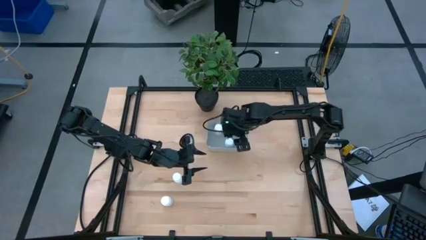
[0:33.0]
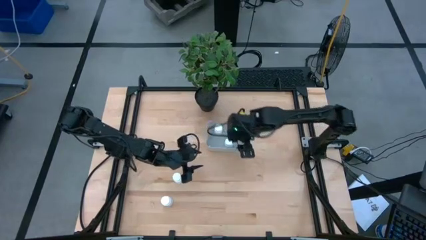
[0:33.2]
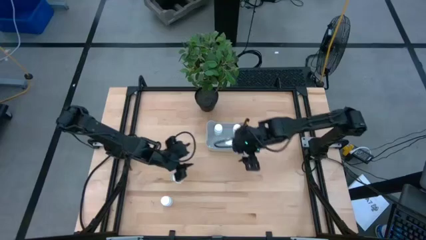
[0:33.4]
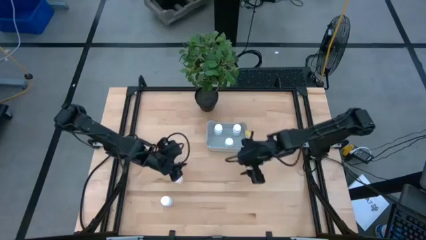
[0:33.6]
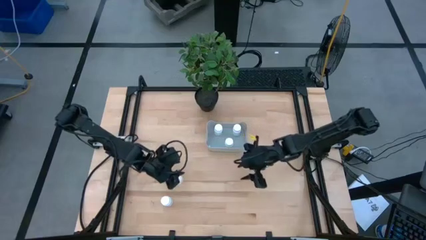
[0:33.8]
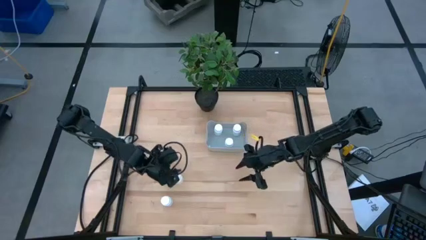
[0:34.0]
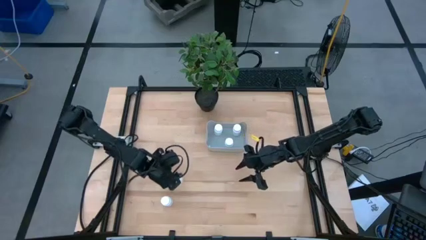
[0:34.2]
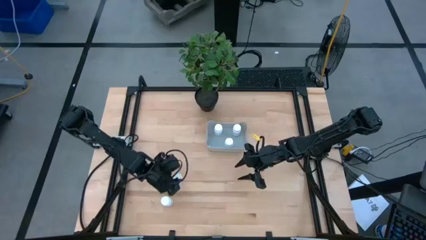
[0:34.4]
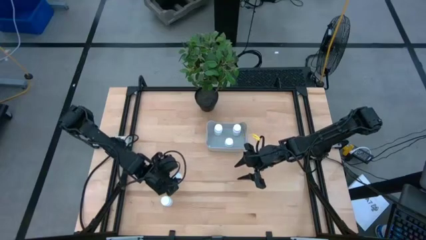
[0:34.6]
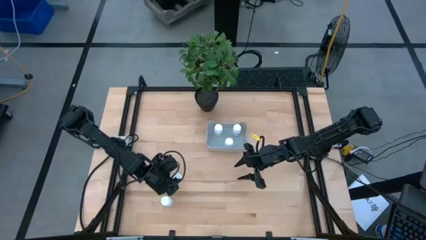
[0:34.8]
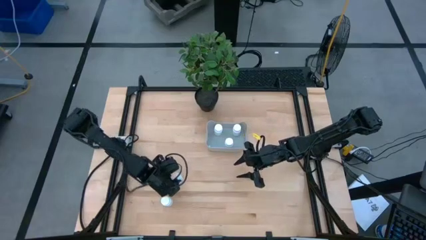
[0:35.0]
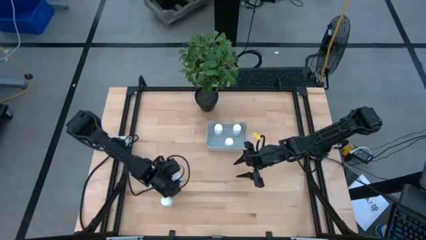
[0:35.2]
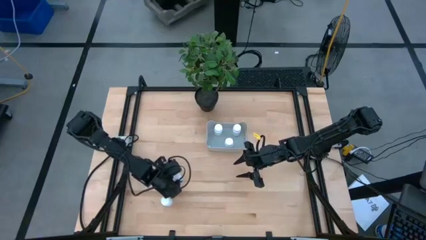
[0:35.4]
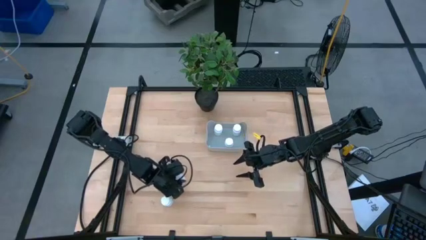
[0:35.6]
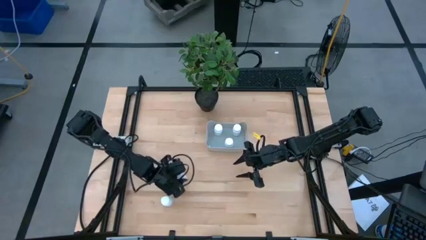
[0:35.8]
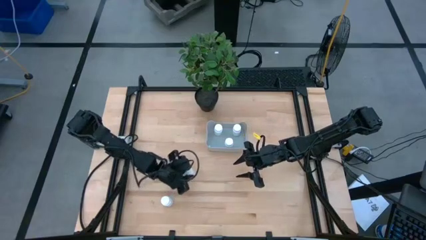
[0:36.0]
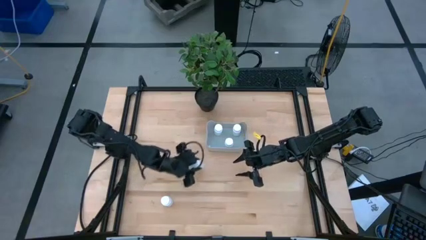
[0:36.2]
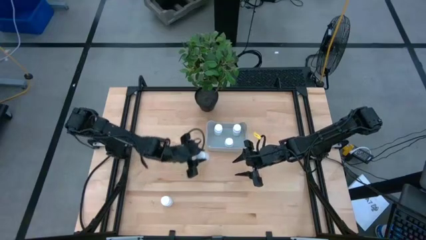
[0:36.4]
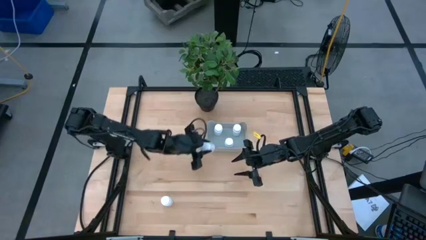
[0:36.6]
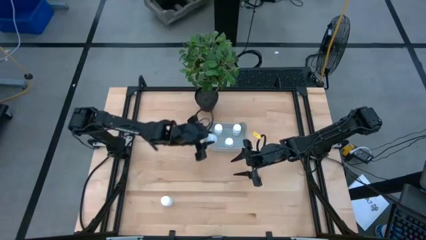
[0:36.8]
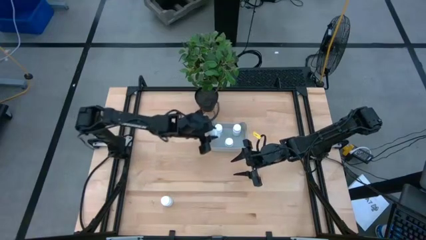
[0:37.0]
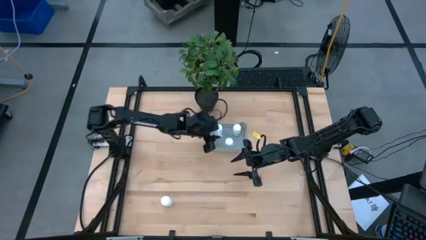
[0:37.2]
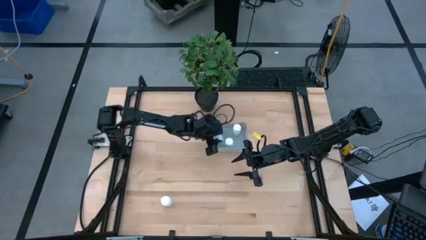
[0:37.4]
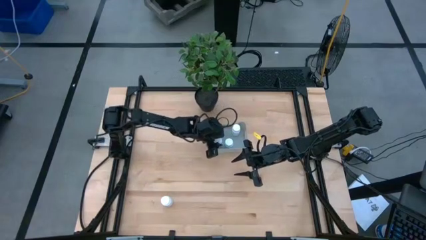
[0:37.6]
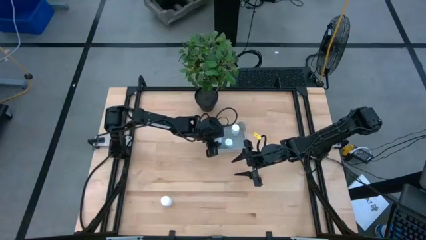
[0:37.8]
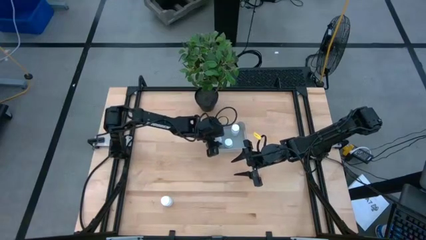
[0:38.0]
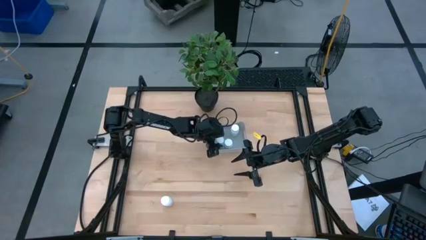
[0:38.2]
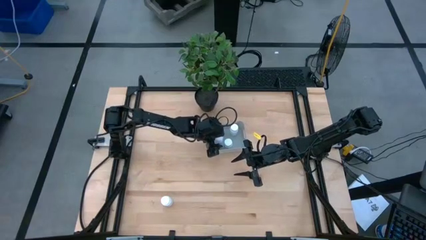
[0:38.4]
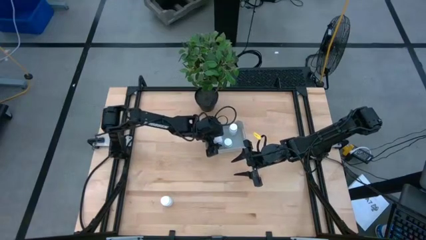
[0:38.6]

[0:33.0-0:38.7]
Task: Pick and place pill bottles into a basket
Put the white medicine bottle into the gray bin

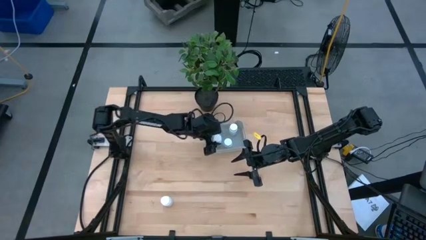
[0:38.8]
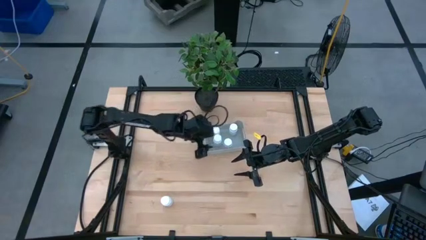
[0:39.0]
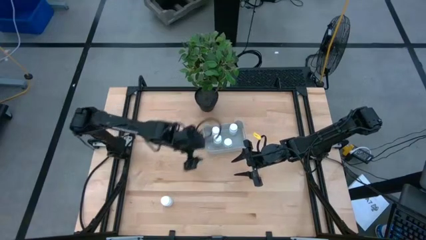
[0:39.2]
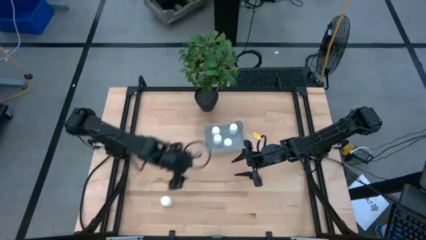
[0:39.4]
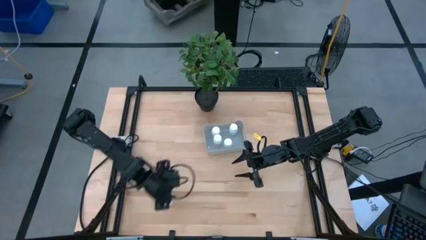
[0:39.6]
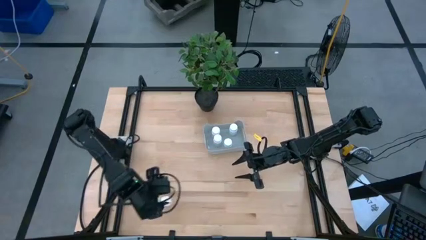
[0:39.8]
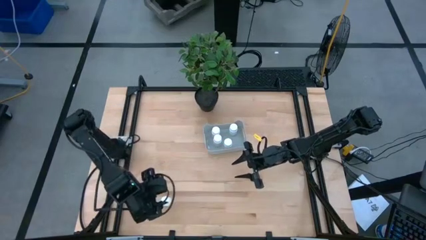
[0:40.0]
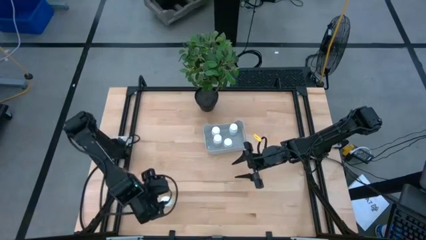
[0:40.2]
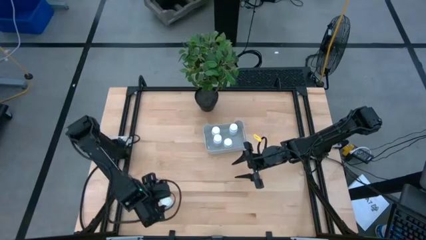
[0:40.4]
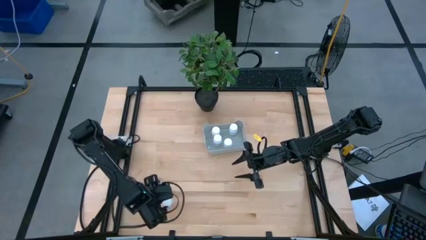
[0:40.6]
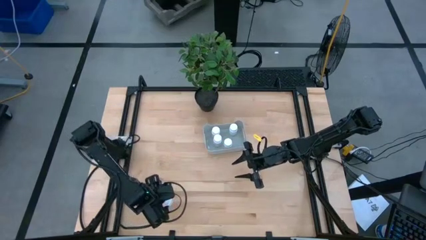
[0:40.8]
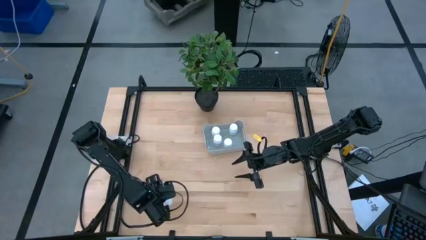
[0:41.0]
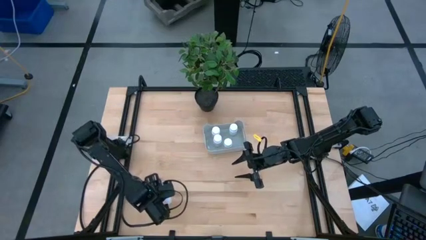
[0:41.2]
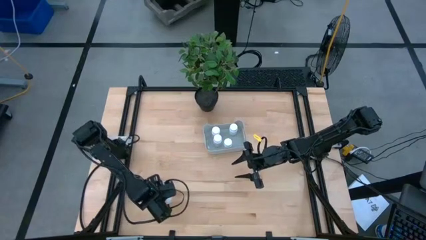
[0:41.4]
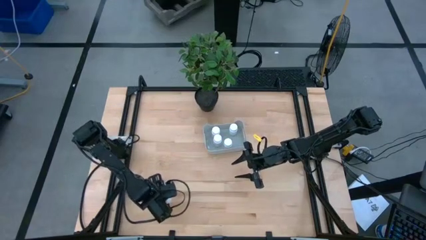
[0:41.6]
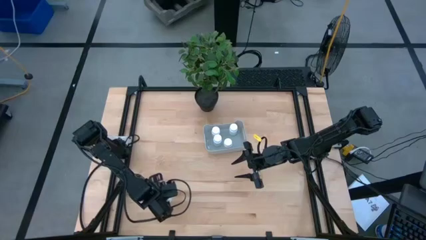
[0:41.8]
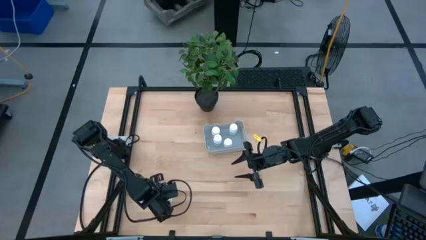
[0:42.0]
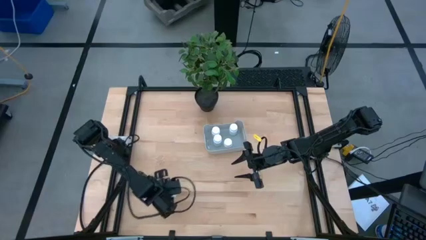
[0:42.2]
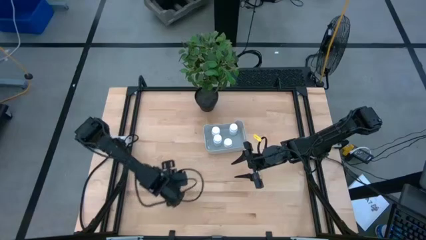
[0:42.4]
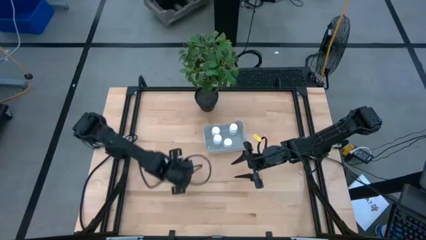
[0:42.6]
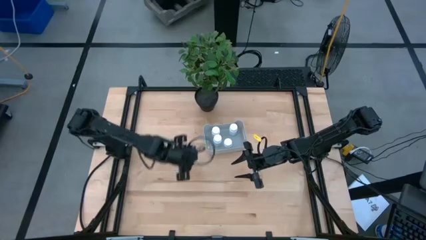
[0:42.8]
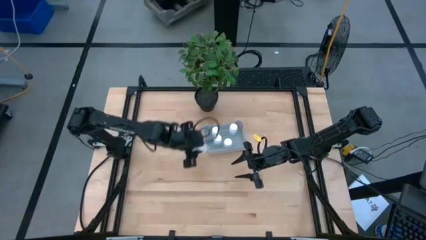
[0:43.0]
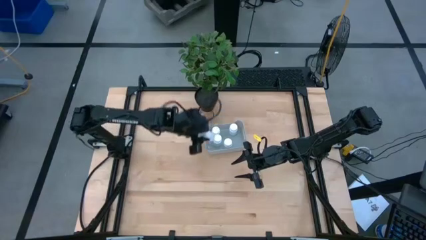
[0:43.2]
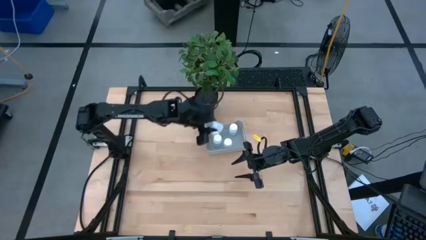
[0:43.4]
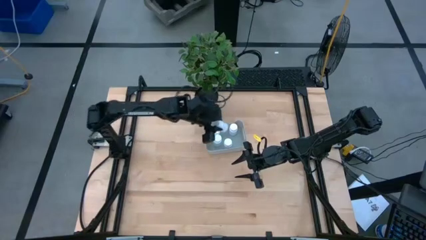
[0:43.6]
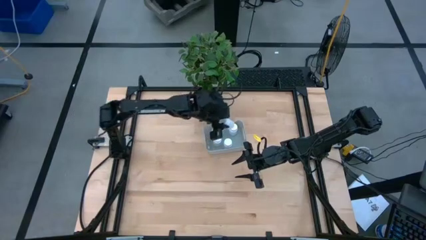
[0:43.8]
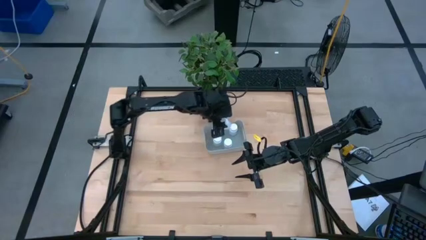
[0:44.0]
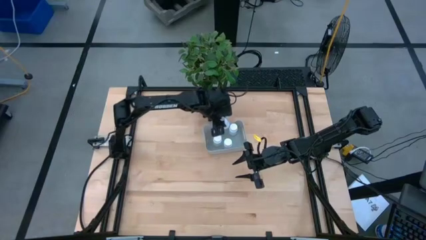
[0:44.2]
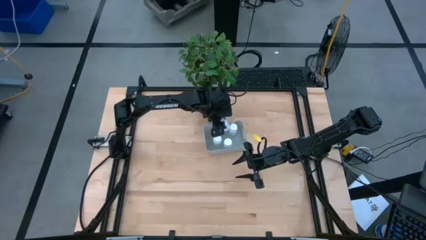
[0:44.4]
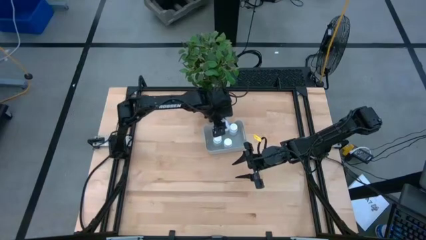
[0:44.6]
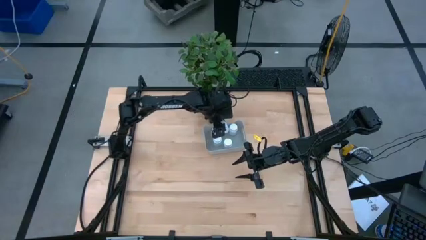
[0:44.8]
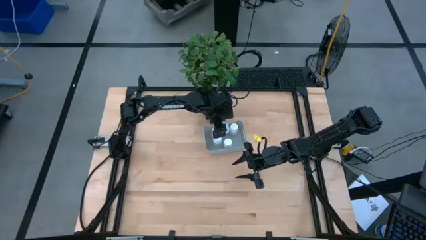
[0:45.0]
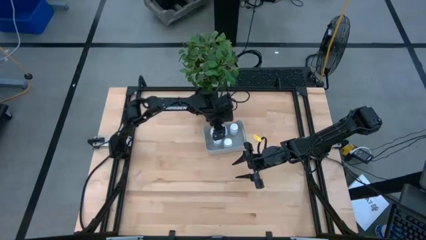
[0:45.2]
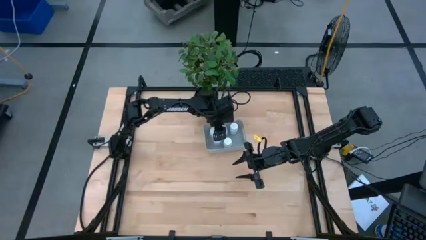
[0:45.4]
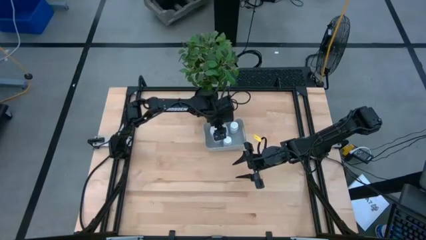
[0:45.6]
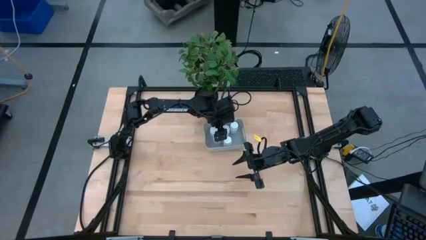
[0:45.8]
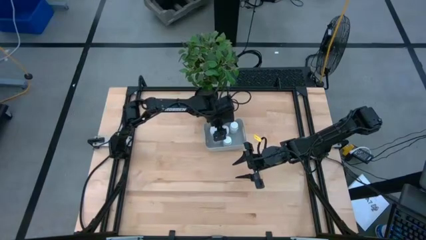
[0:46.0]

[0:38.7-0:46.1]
Put the white medicine bottle into the gray bin

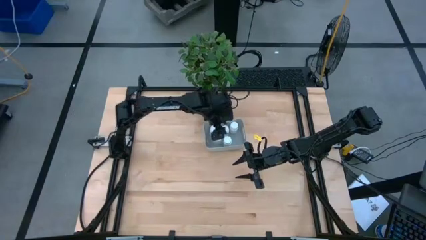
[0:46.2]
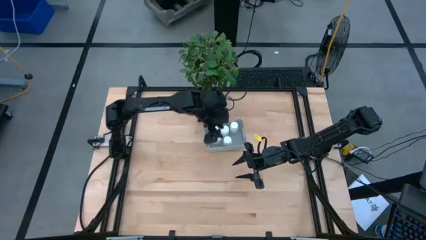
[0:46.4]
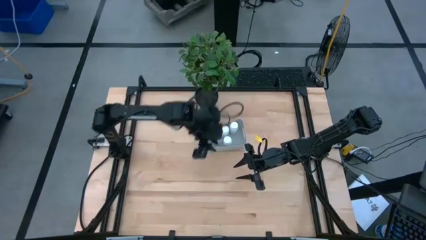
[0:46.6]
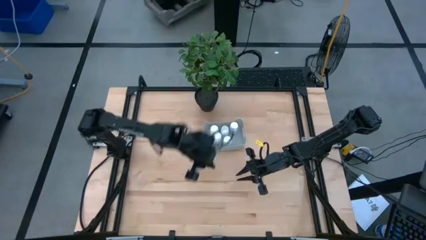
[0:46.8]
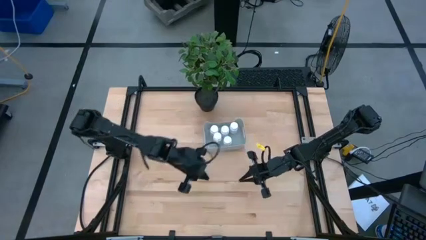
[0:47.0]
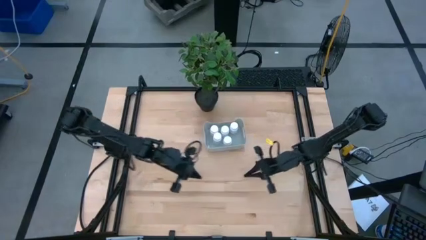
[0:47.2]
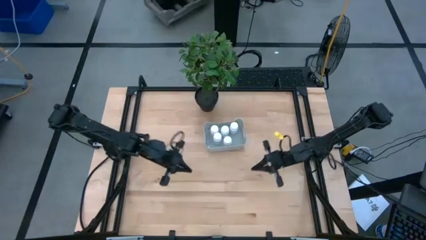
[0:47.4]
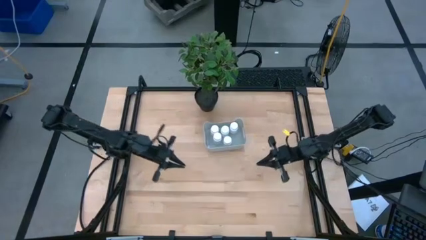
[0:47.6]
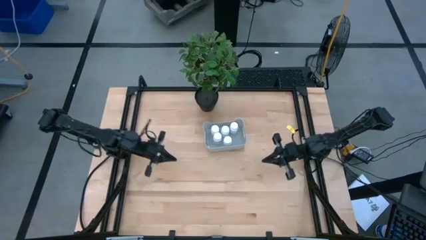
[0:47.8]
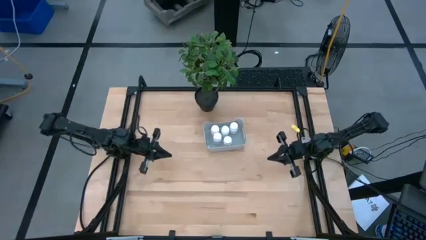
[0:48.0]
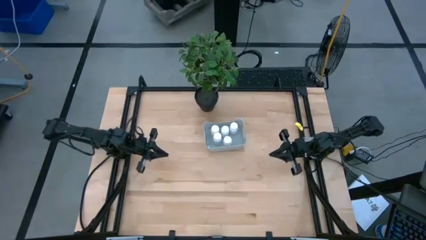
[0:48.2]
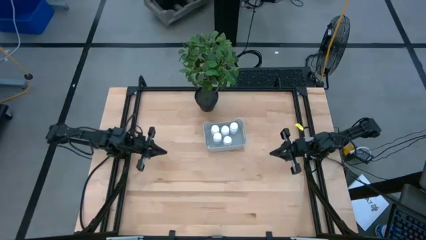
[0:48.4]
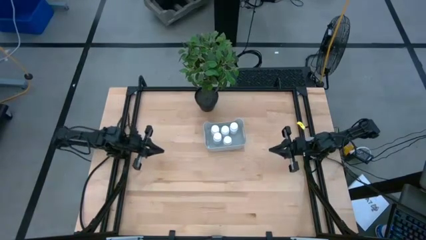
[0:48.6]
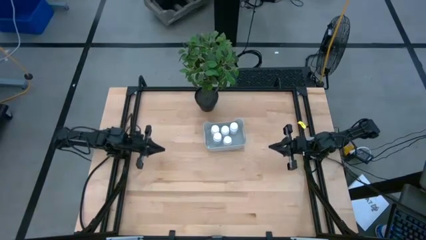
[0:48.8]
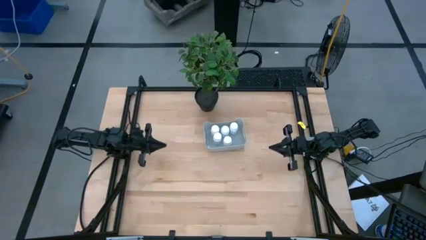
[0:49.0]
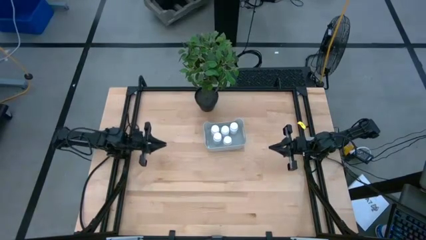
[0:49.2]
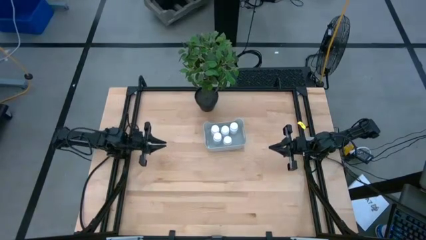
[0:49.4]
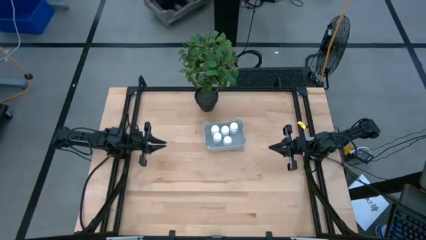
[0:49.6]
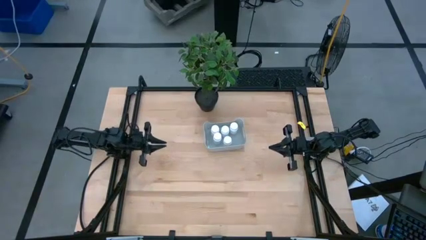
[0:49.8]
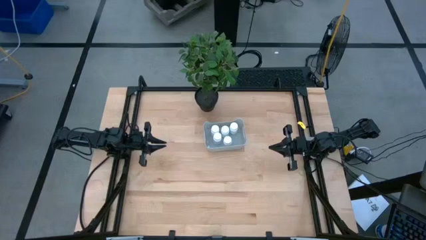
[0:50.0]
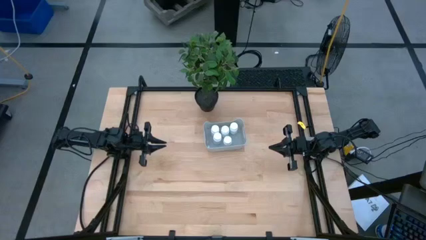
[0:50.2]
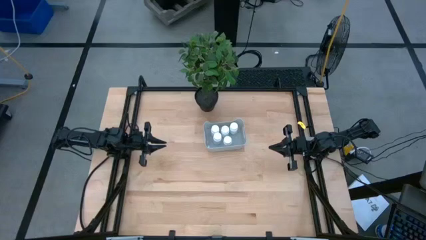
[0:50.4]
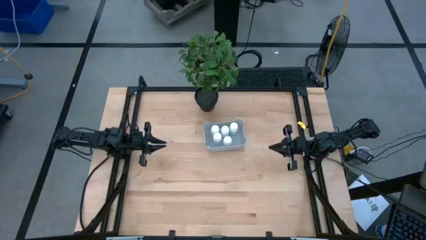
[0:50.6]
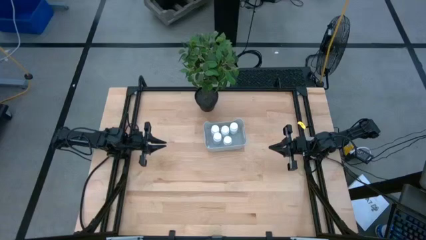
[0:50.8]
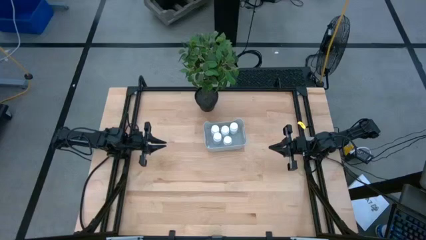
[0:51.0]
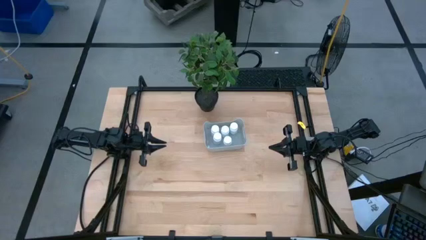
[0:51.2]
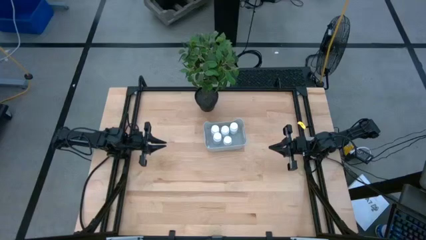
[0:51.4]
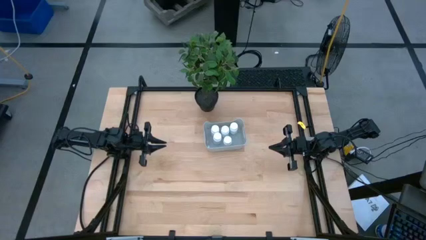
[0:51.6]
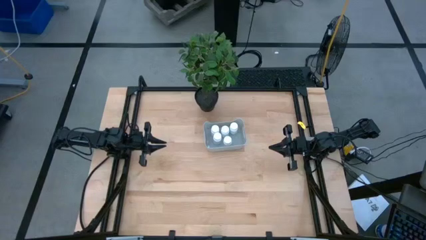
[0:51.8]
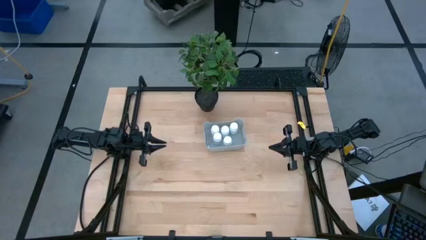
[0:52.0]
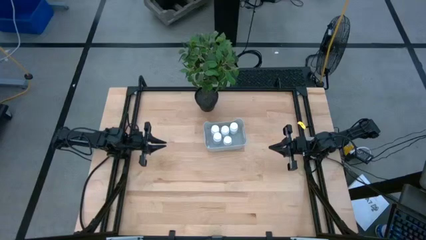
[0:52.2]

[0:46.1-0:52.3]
Return to Home Position
